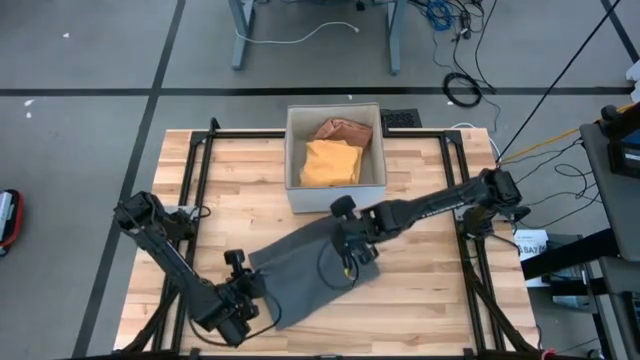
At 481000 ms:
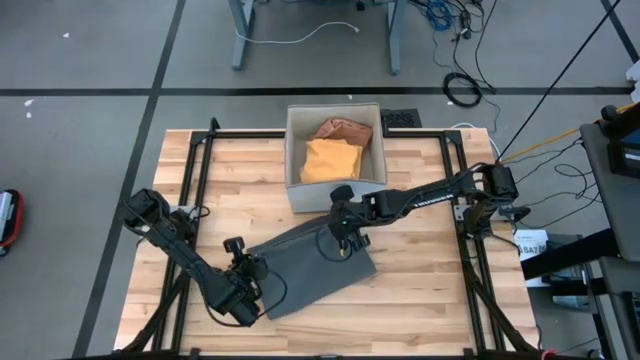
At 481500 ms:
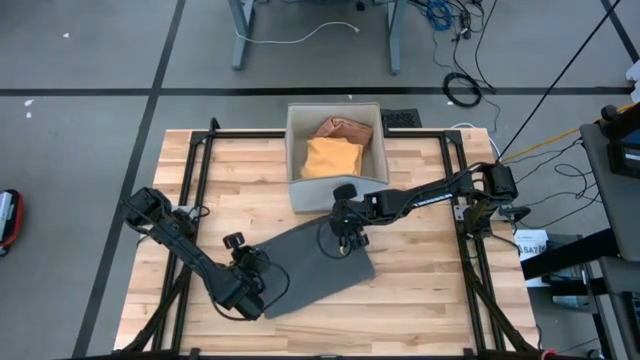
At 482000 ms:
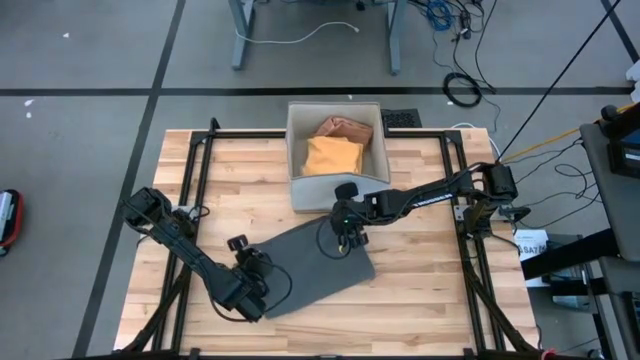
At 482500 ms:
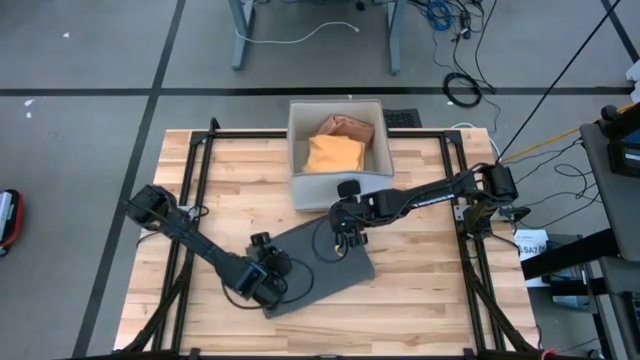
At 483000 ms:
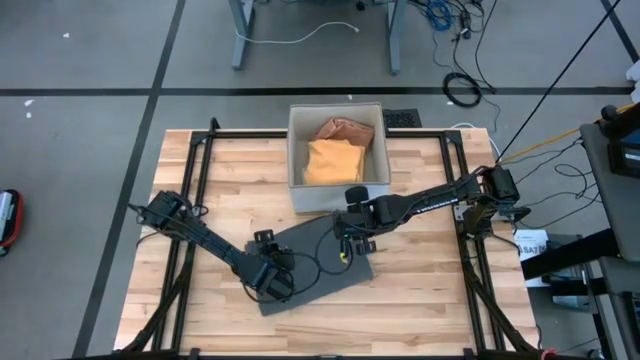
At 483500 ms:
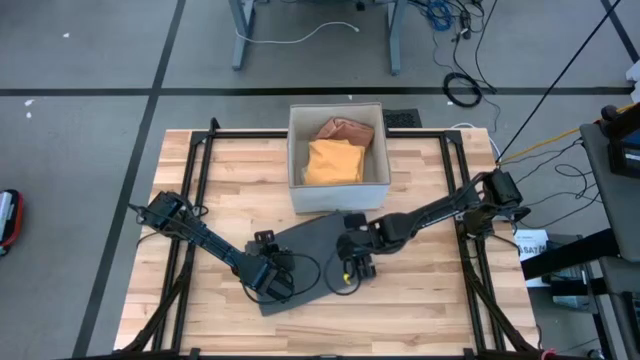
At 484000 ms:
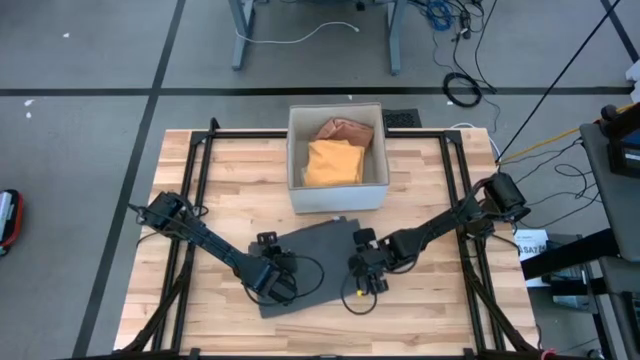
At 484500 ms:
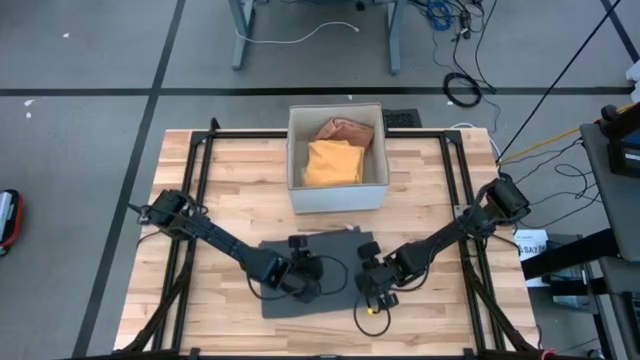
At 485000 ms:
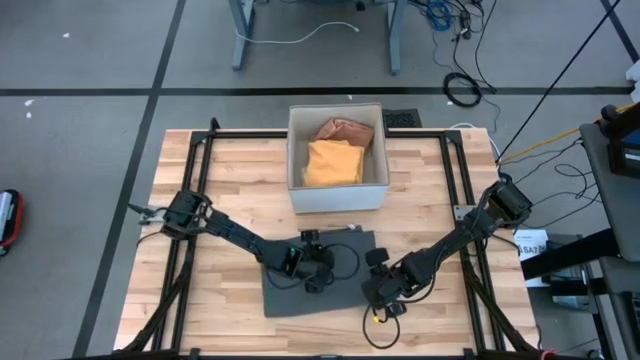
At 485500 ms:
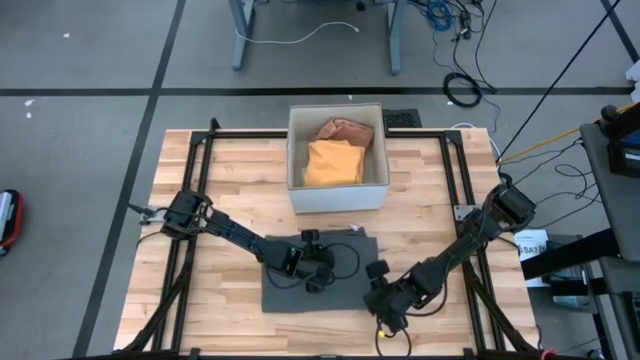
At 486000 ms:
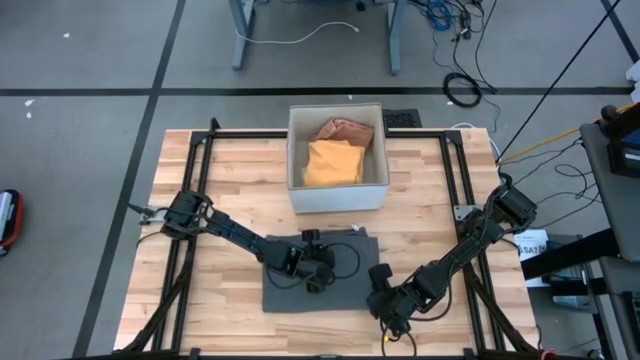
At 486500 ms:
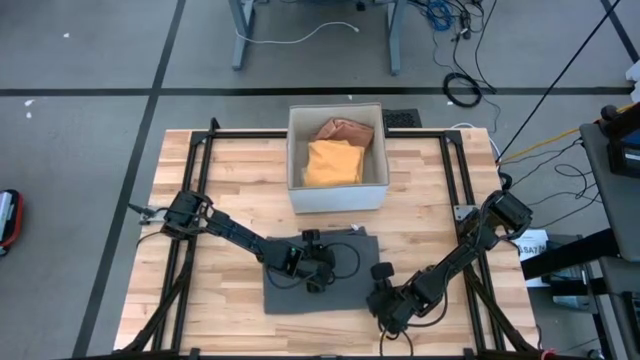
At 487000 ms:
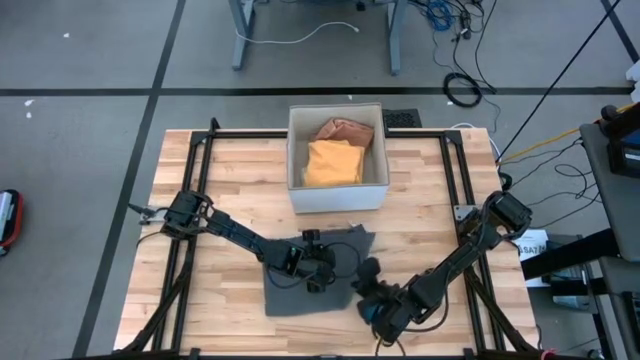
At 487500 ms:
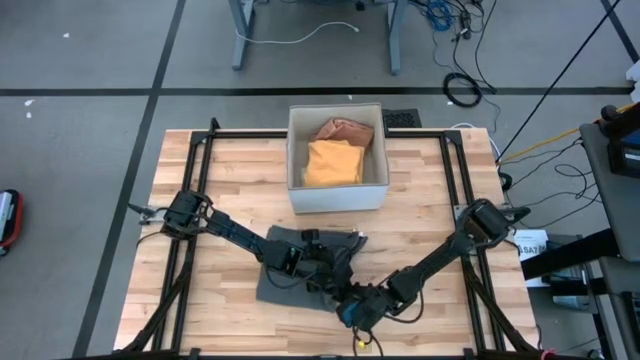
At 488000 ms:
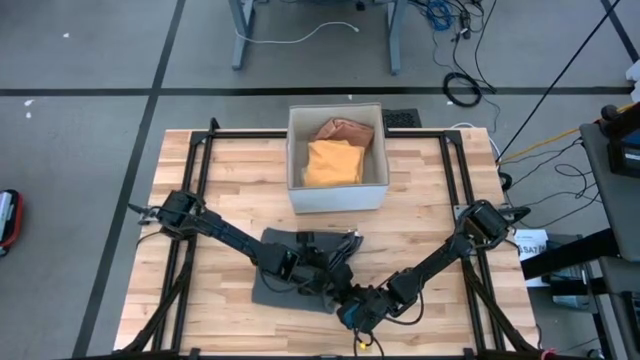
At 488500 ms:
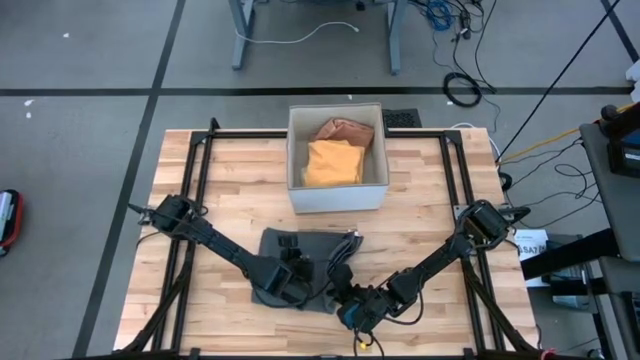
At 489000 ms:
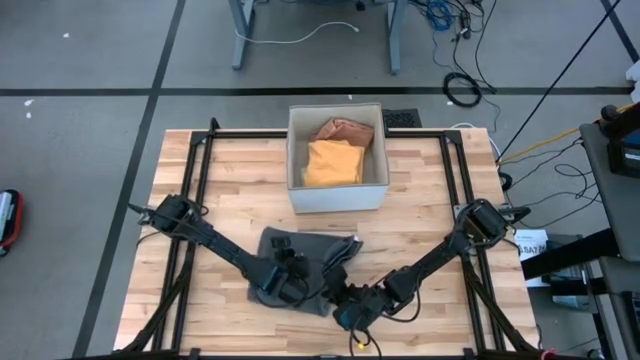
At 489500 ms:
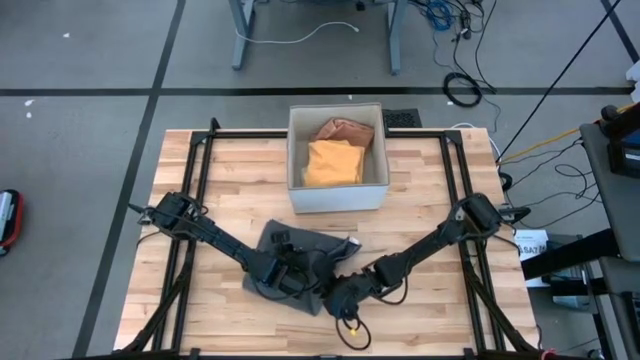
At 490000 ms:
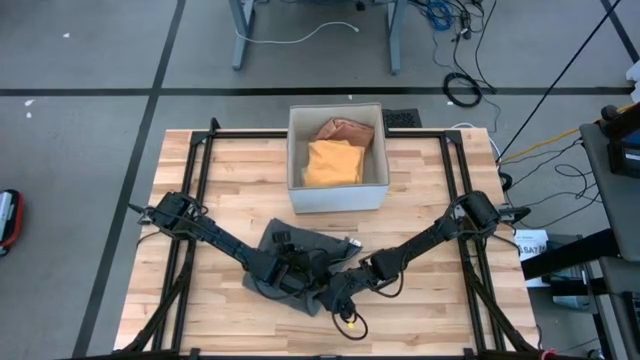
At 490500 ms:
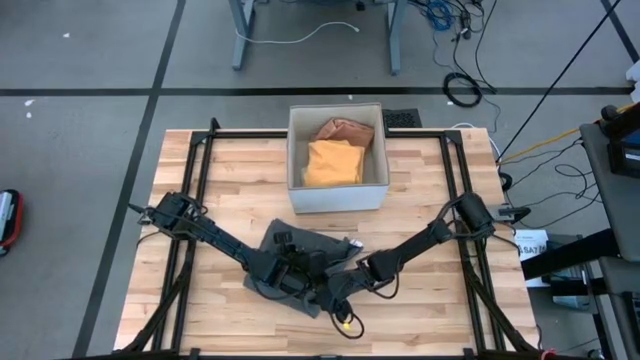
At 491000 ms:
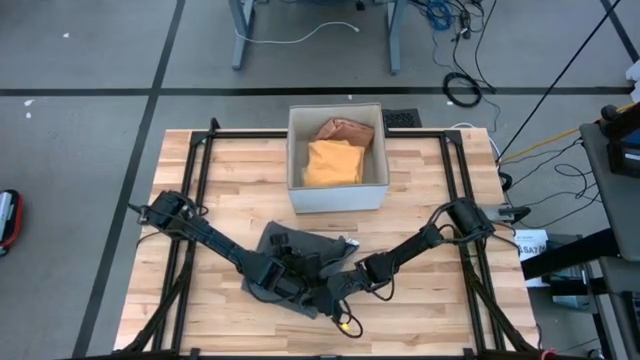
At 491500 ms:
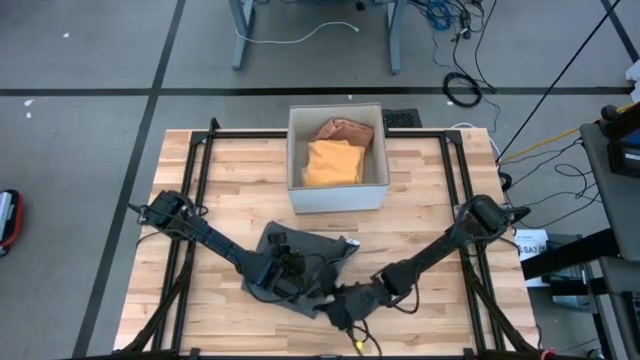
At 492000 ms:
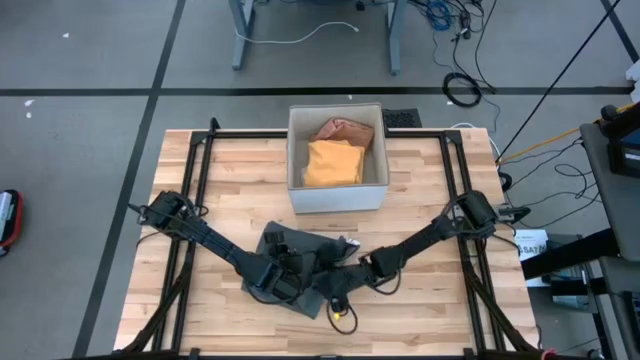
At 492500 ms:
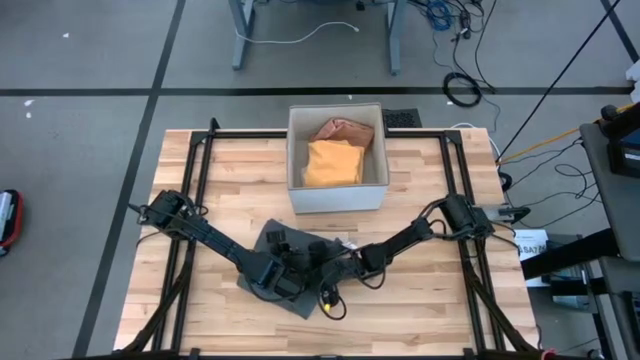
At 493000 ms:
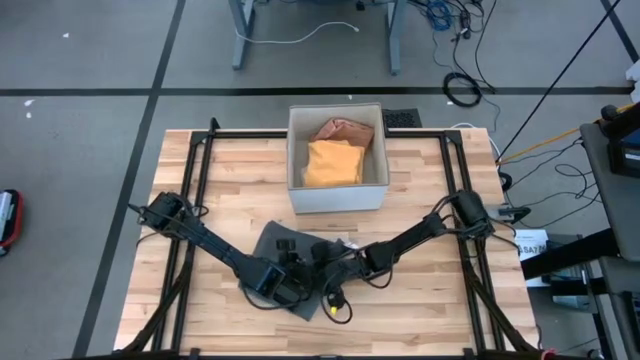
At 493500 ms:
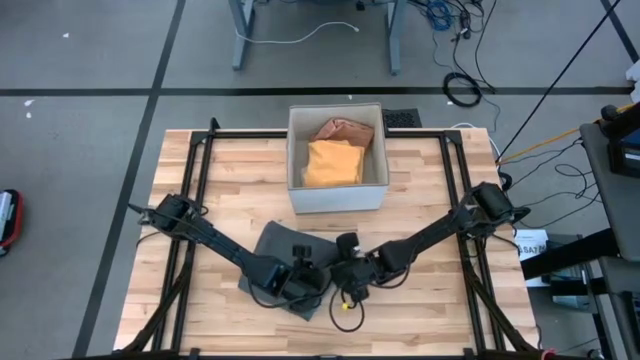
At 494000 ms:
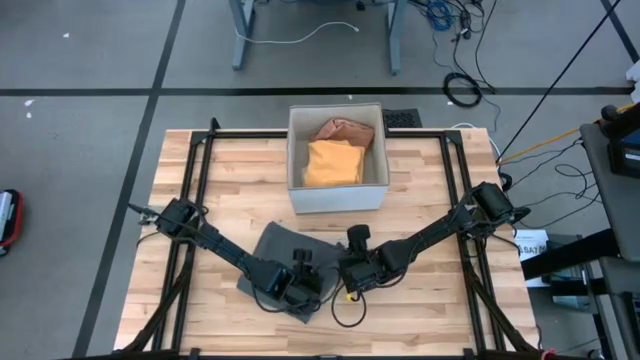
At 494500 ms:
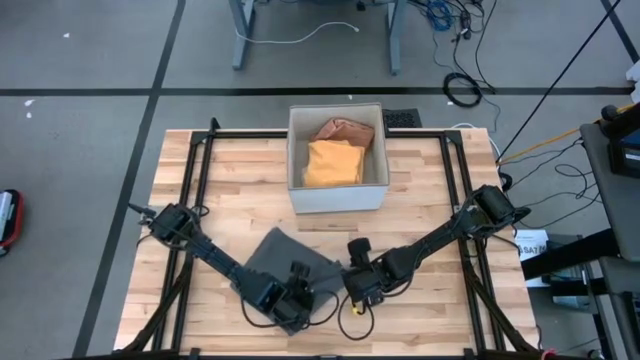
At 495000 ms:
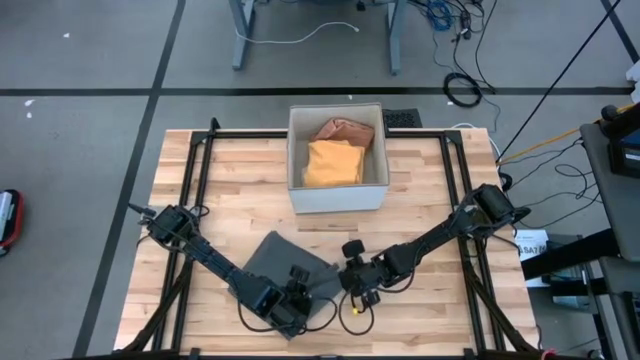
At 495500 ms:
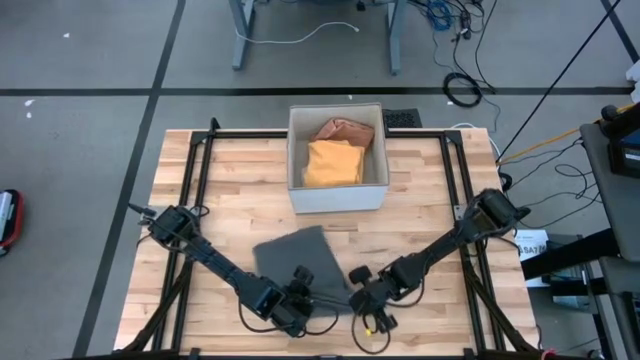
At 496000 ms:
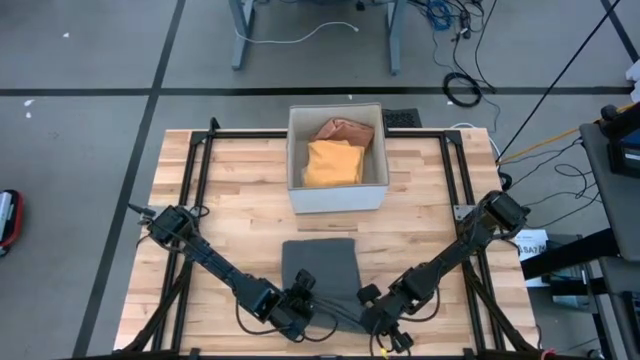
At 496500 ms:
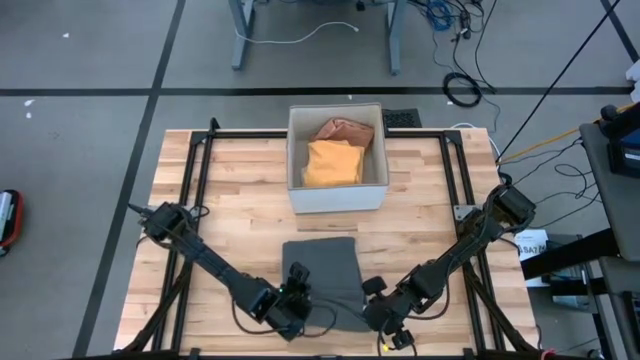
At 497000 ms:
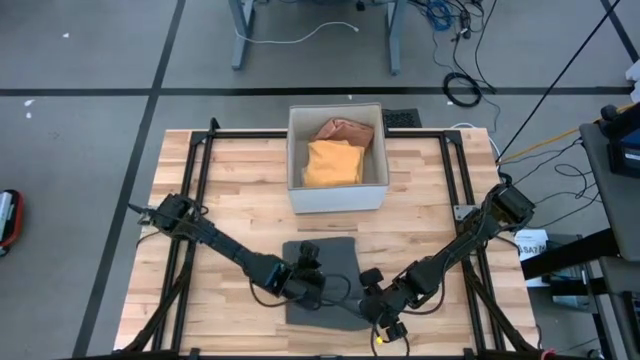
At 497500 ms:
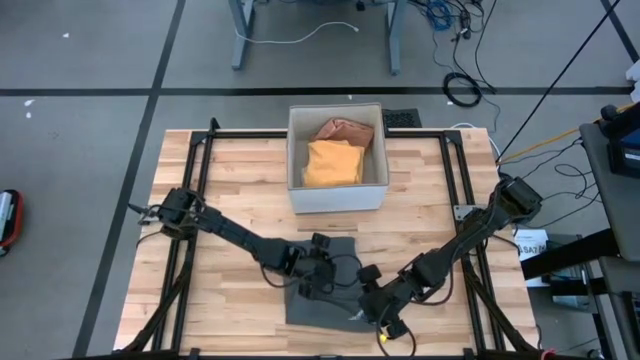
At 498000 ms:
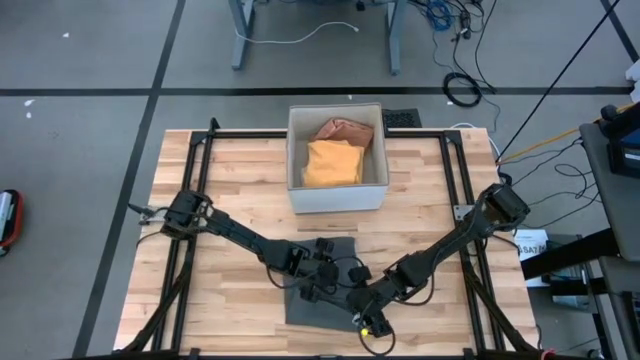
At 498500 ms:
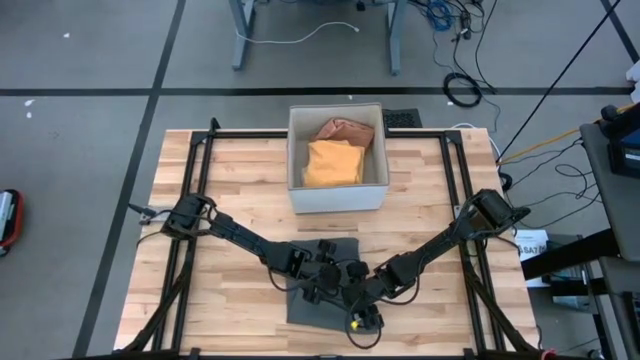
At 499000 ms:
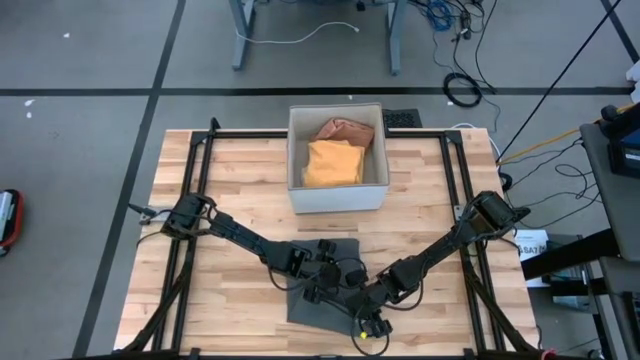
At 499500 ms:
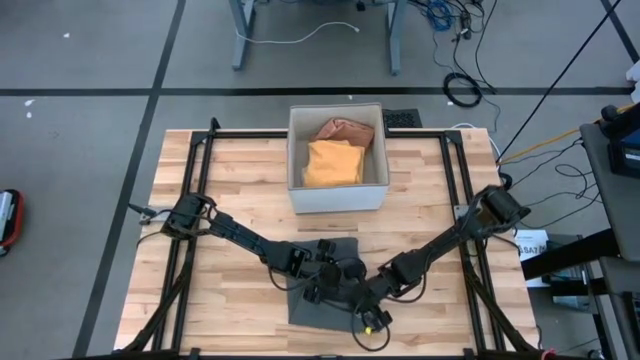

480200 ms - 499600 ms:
Task: Fold towel
Fold the gray towel
